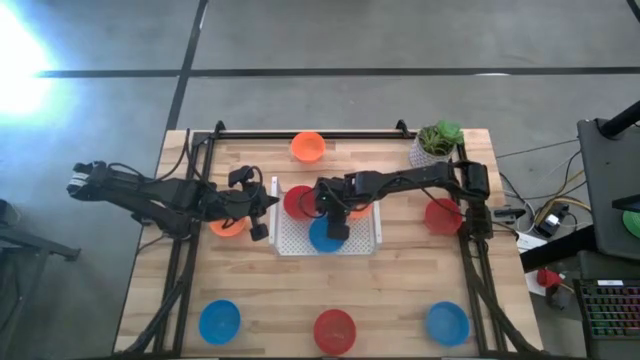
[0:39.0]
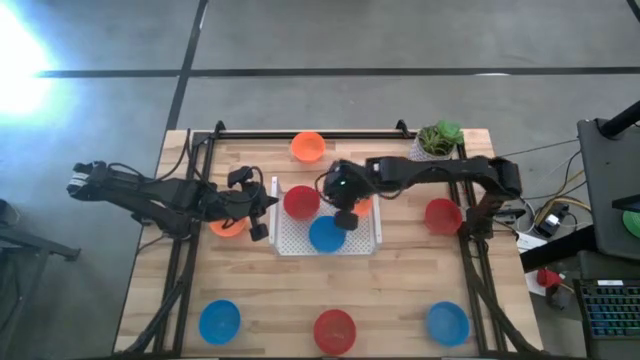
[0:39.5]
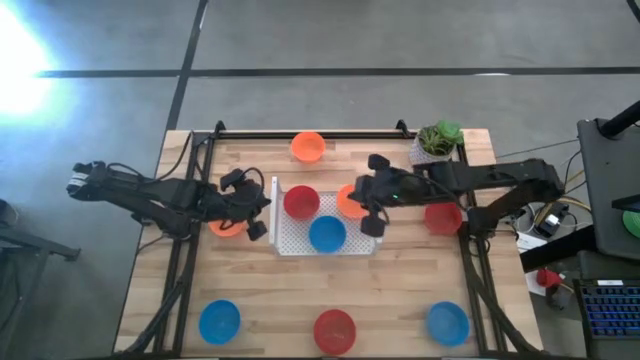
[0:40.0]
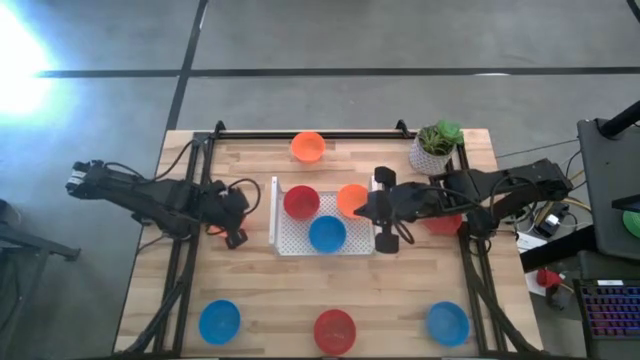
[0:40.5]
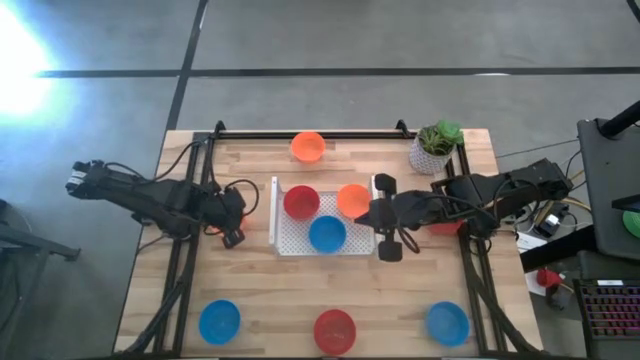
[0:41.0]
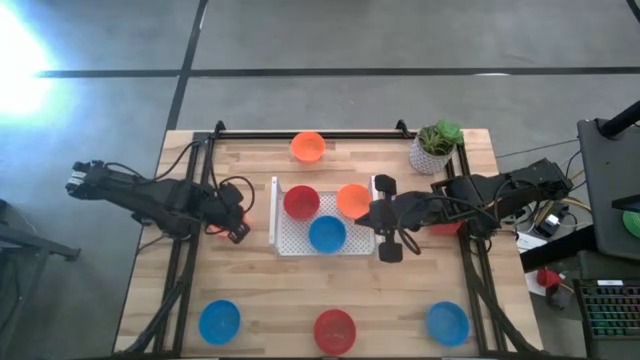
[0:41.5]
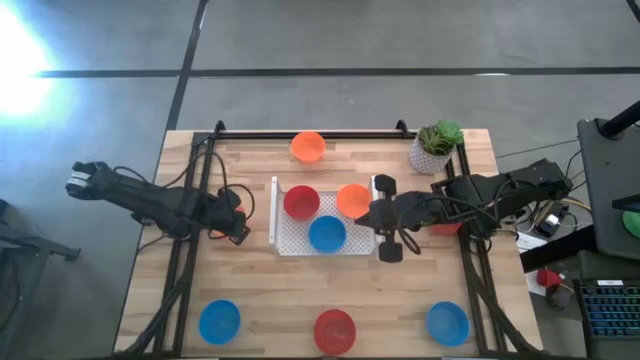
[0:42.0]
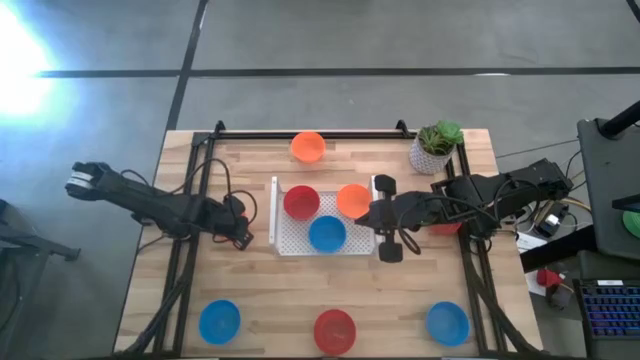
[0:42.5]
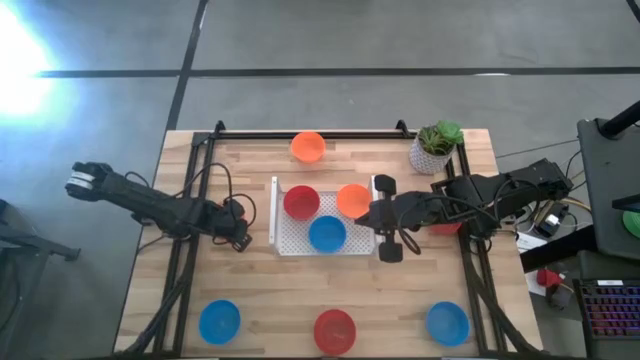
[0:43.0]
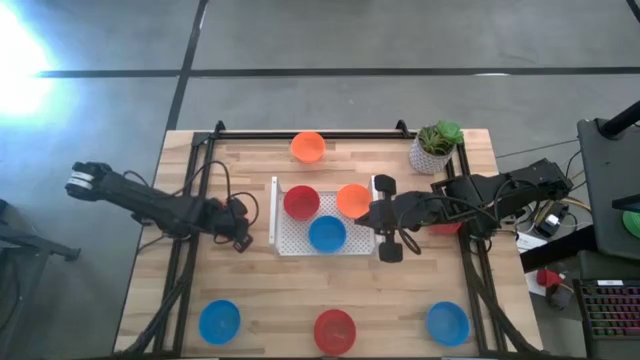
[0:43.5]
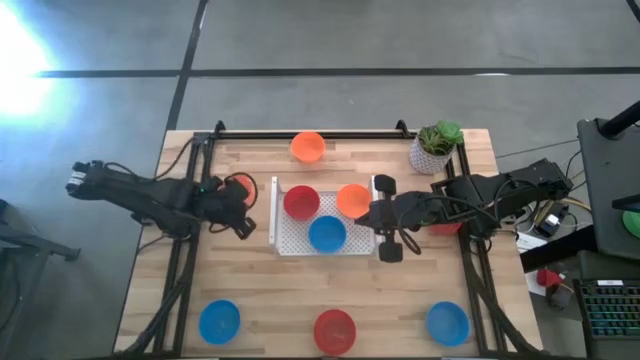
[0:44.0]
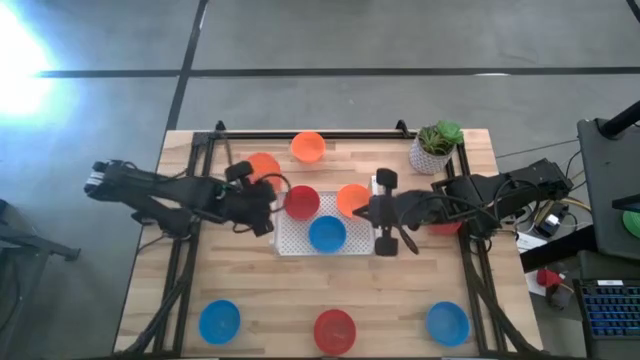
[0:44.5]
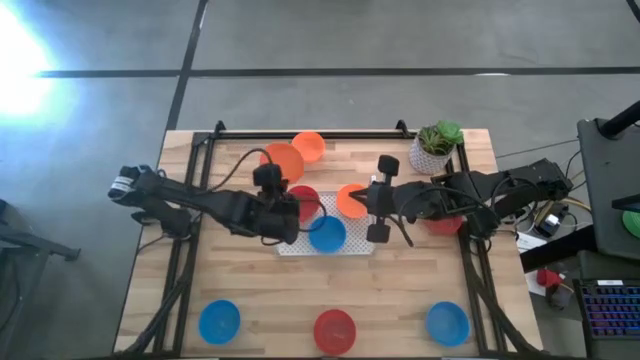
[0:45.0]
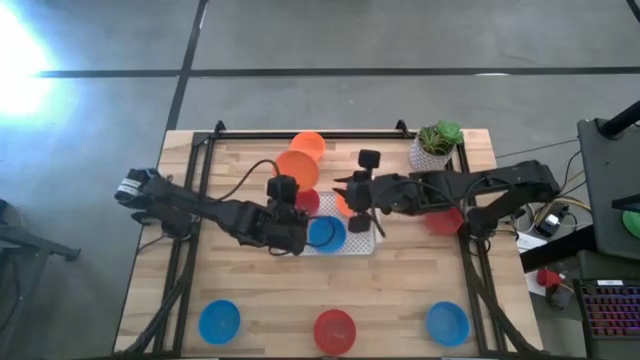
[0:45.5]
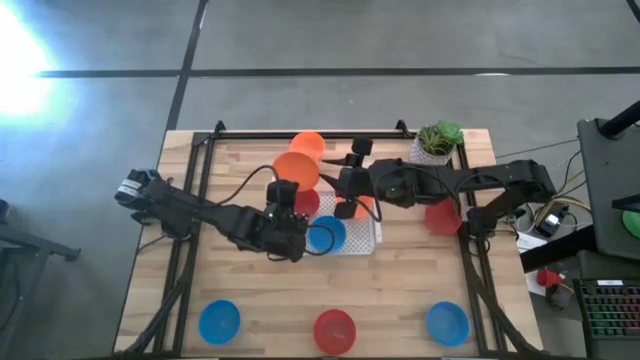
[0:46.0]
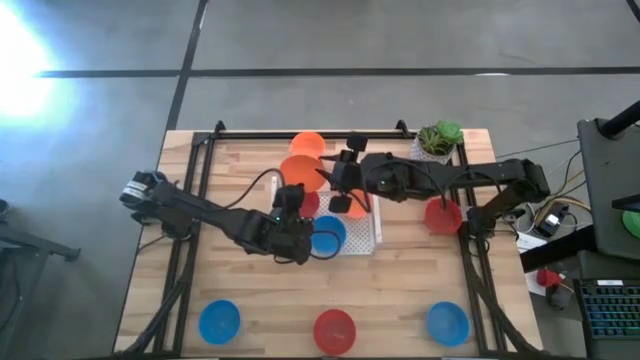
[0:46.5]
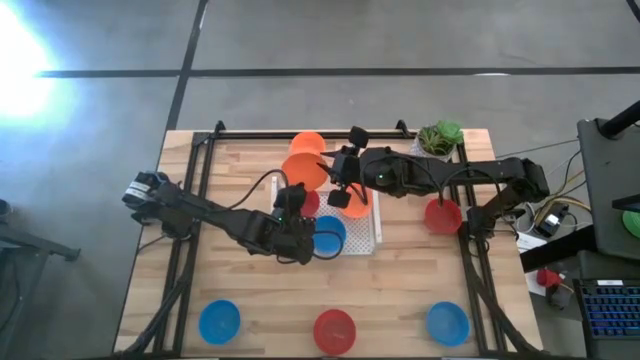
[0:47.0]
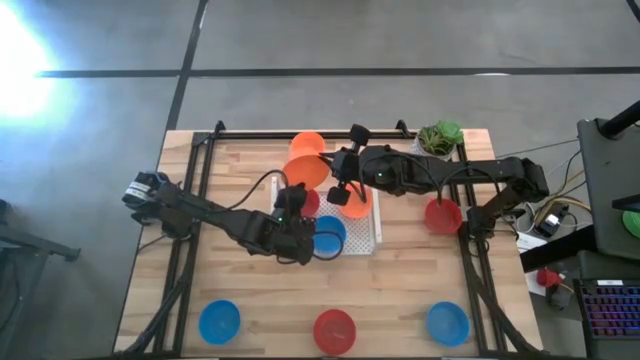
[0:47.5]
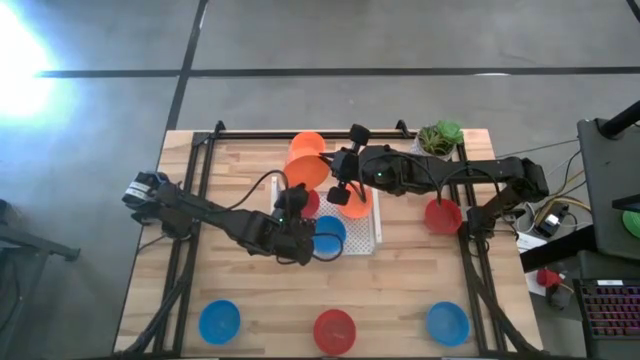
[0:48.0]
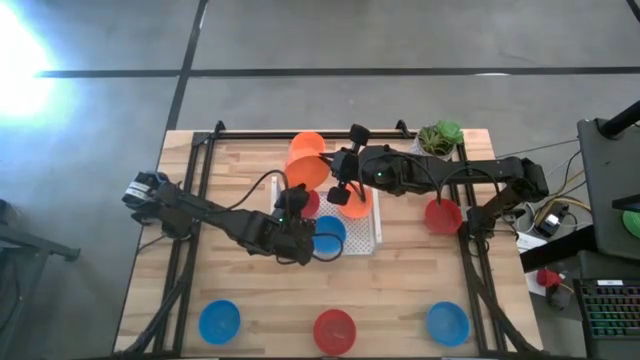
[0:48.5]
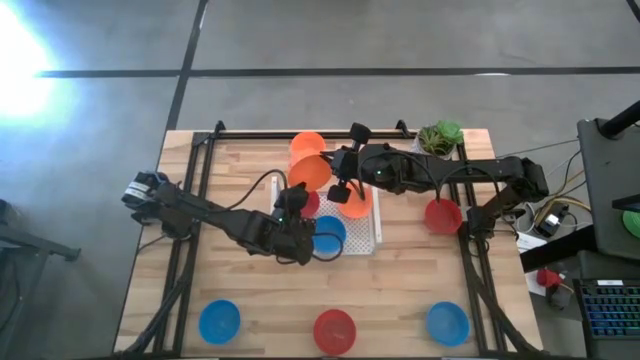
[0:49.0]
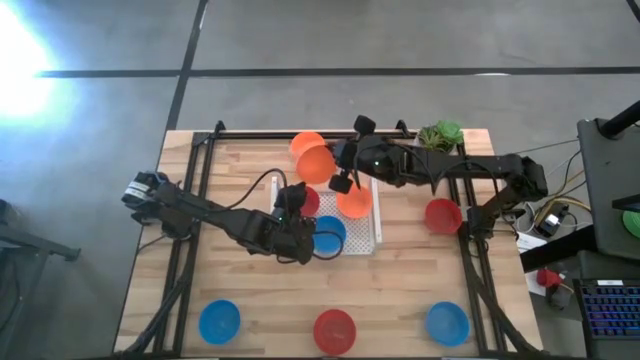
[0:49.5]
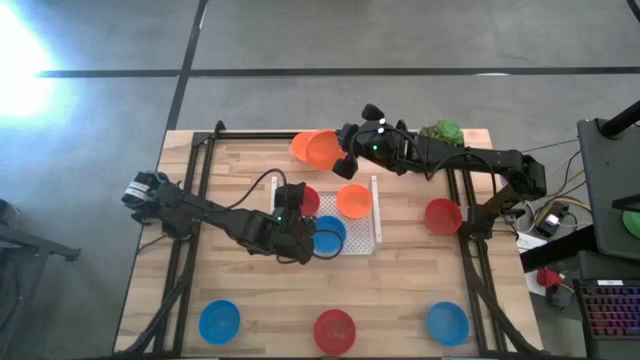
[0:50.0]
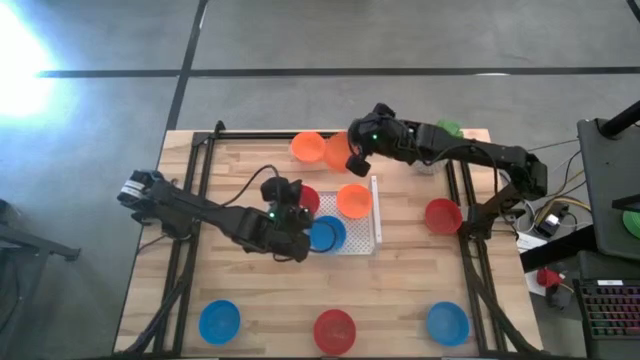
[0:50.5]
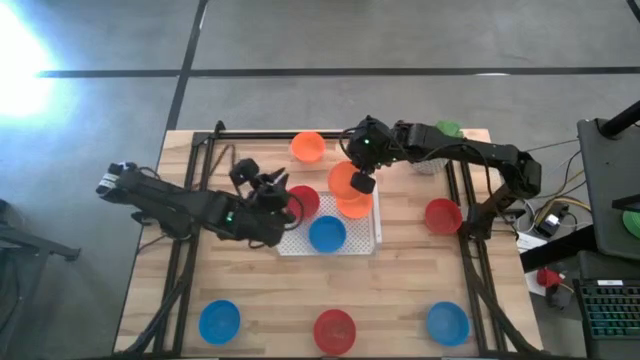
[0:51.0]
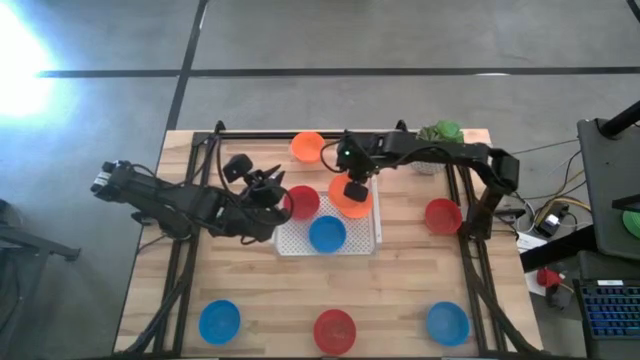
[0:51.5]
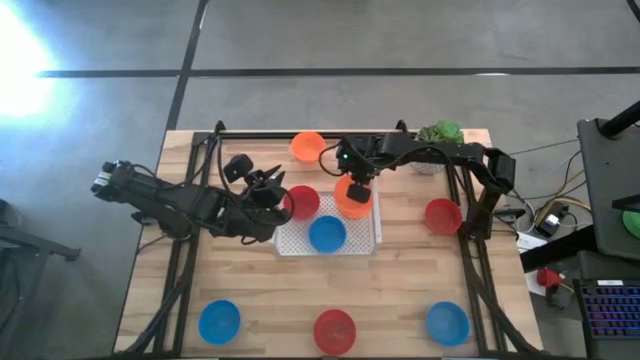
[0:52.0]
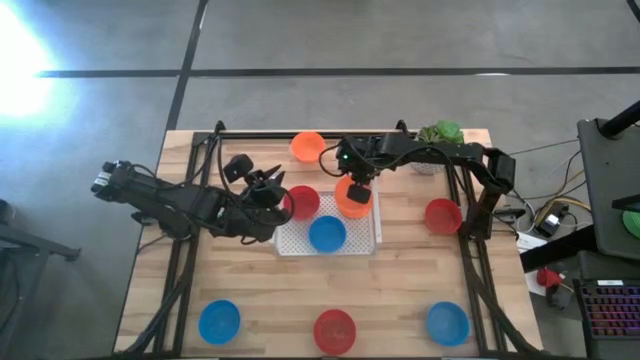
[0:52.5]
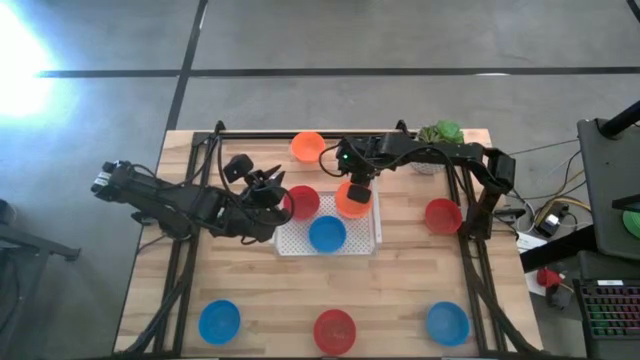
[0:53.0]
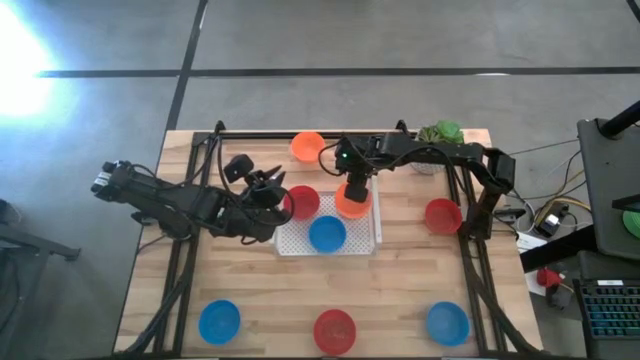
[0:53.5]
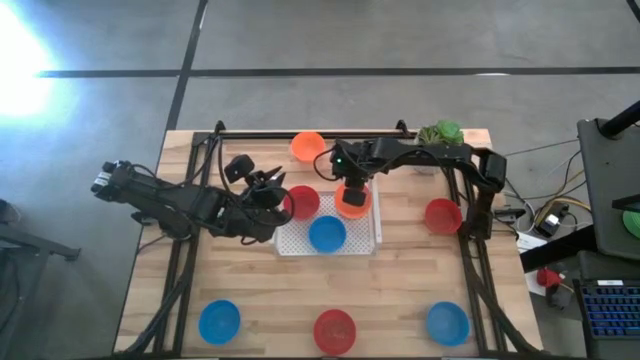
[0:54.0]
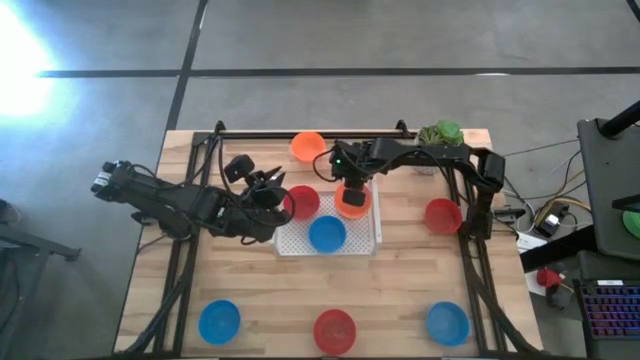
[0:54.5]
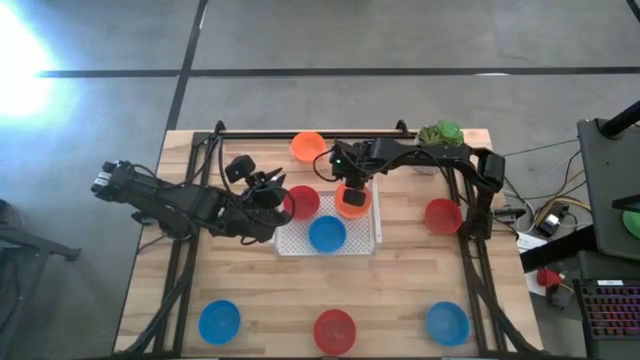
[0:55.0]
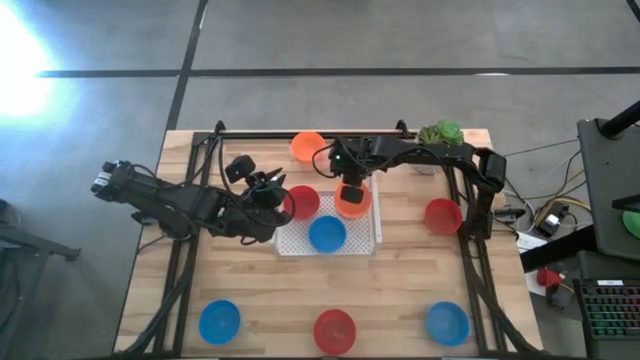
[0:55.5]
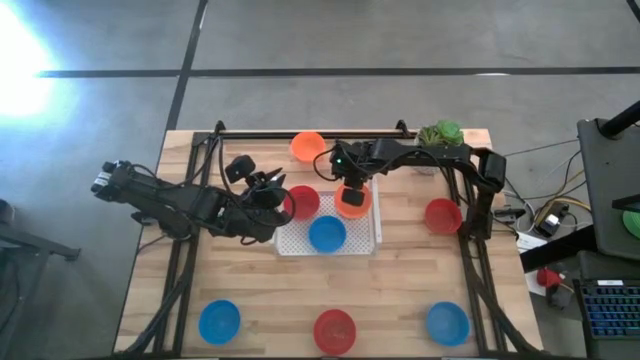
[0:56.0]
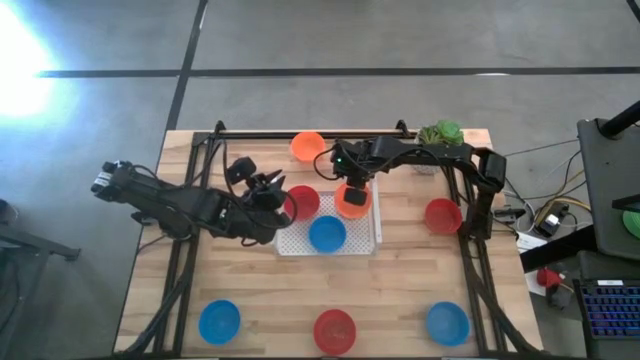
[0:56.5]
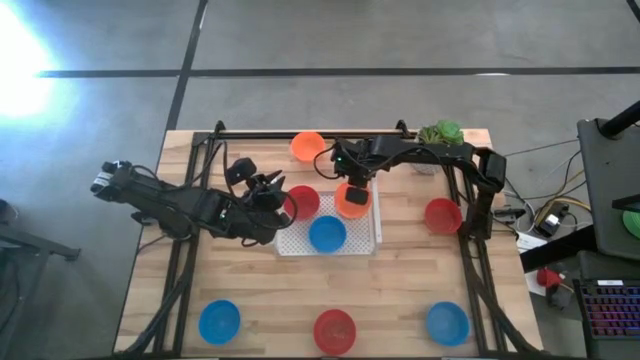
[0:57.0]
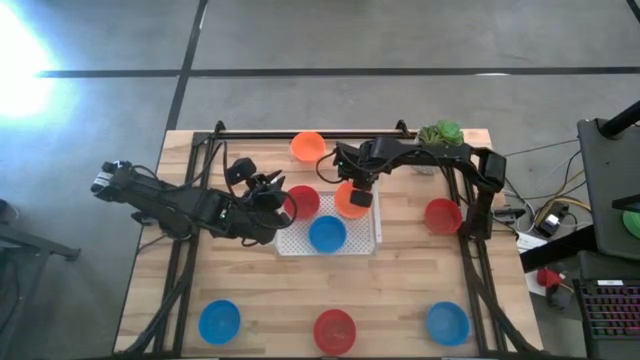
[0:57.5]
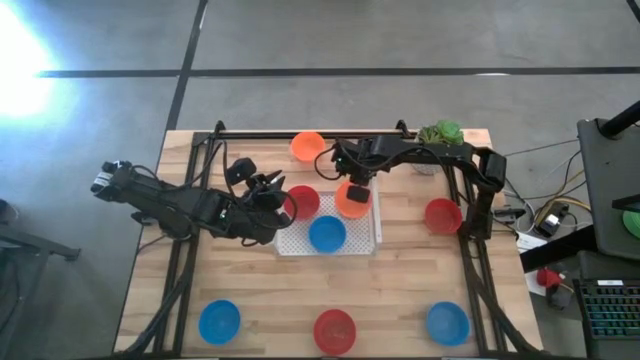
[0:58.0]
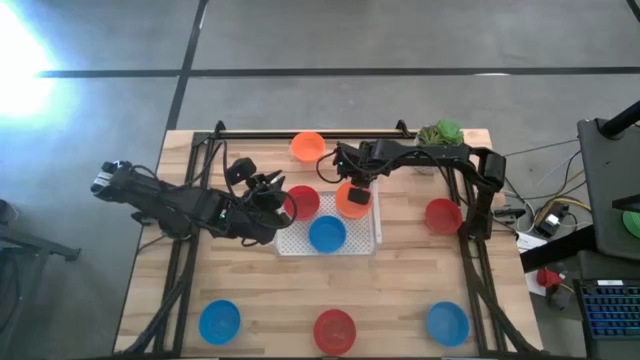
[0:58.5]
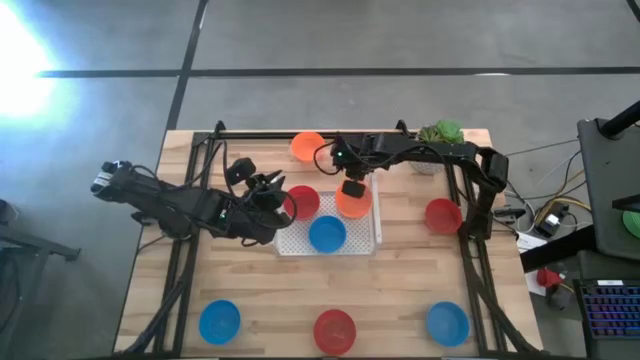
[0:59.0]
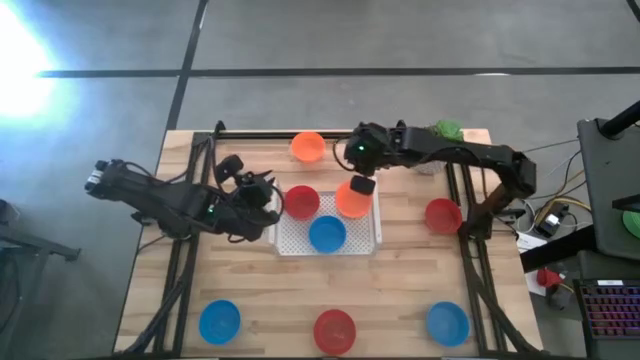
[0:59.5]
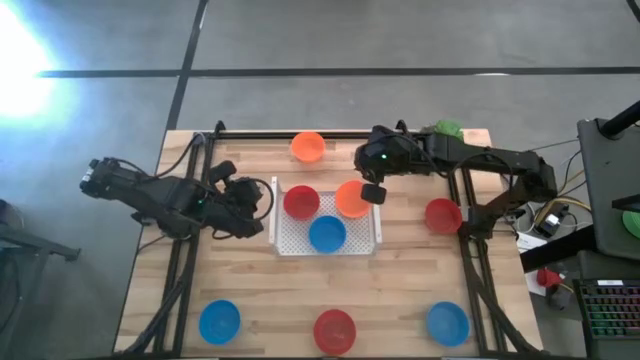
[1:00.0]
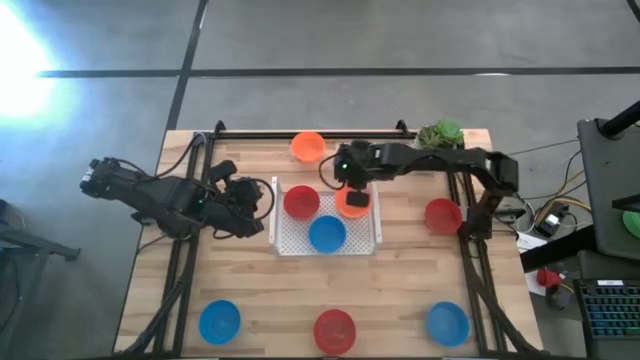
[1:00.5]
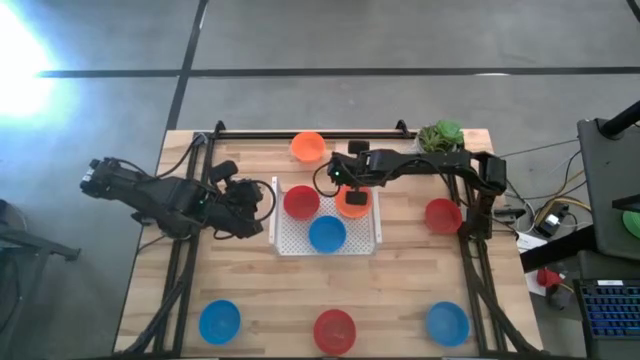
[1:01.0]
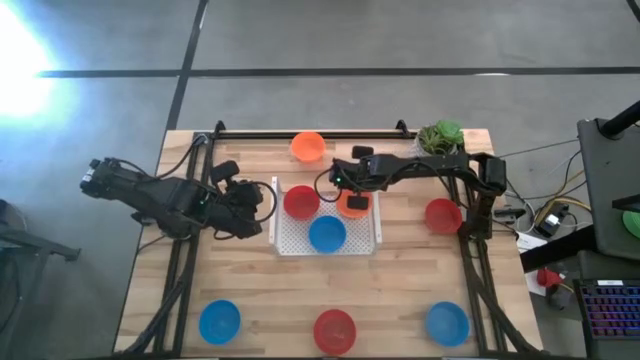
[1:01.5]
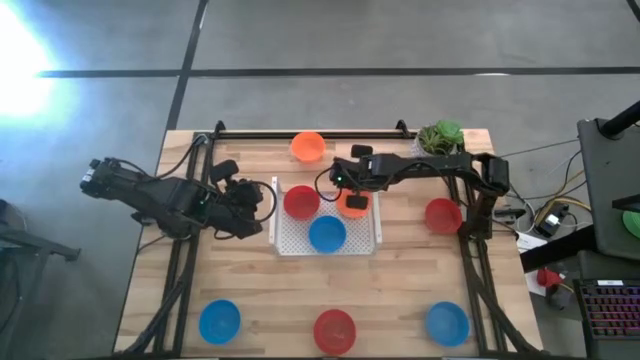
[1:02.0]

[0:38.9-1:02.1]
Task: Pick & Place Mini bowls
Stack the bottom orange bowl on top of the orange bowl on the shelf
